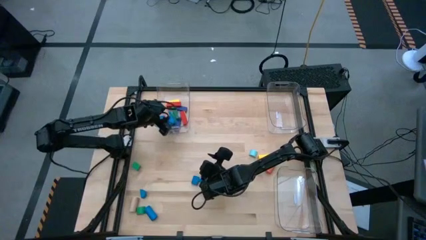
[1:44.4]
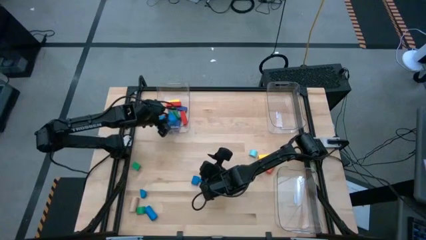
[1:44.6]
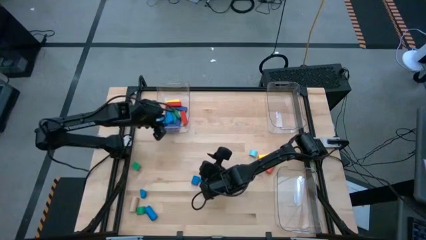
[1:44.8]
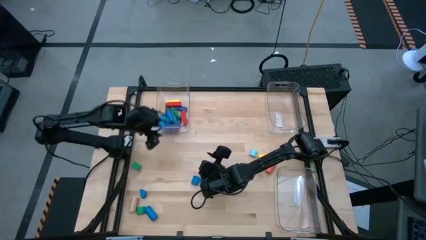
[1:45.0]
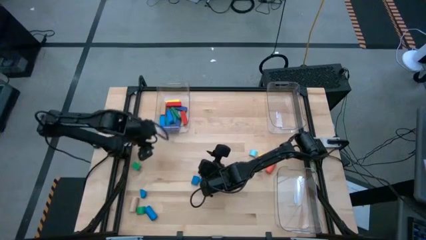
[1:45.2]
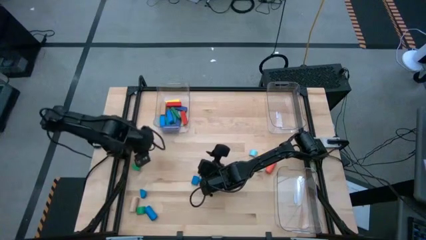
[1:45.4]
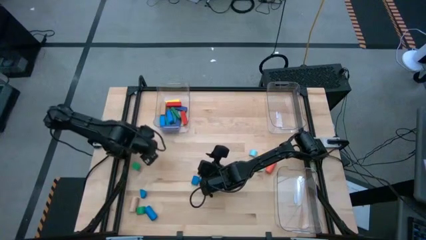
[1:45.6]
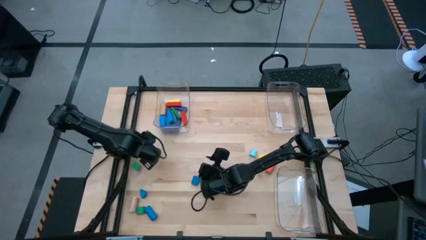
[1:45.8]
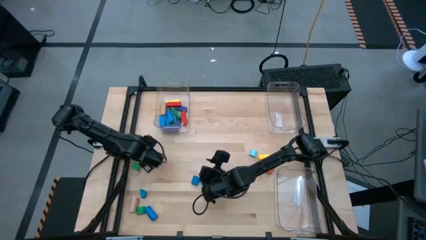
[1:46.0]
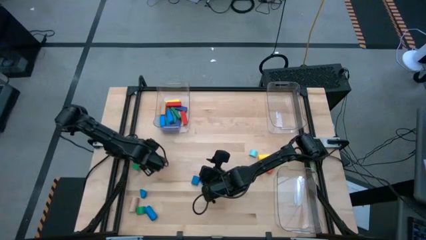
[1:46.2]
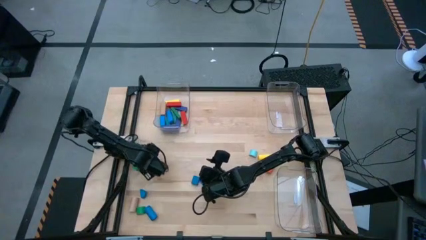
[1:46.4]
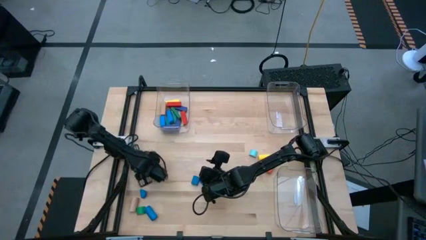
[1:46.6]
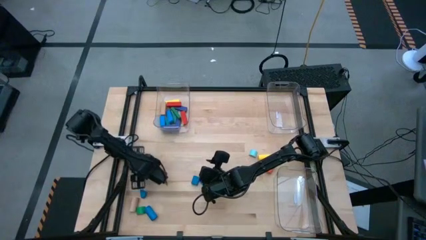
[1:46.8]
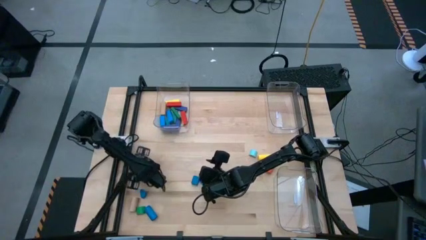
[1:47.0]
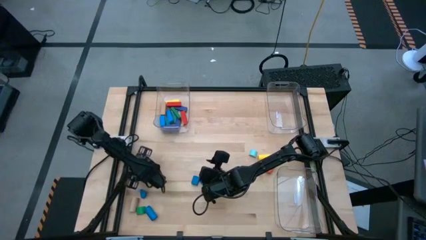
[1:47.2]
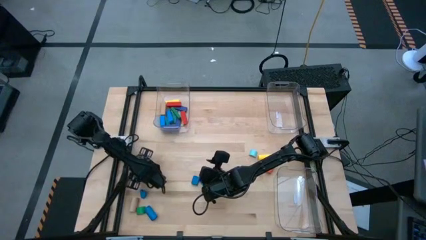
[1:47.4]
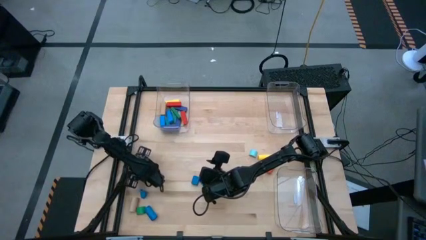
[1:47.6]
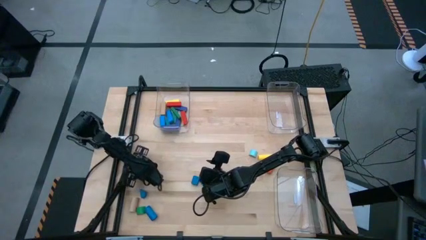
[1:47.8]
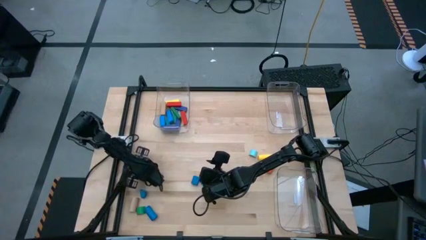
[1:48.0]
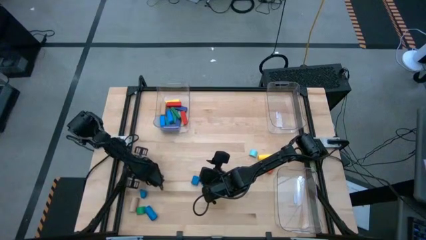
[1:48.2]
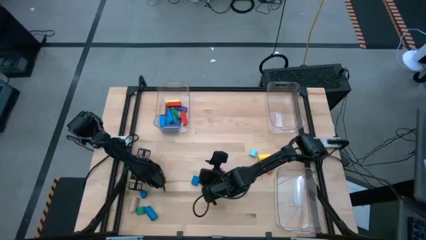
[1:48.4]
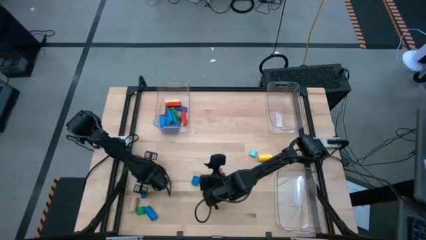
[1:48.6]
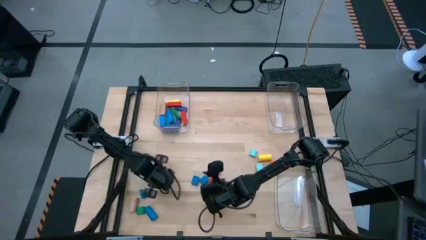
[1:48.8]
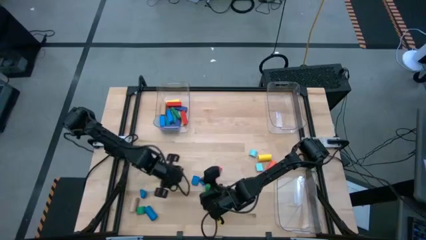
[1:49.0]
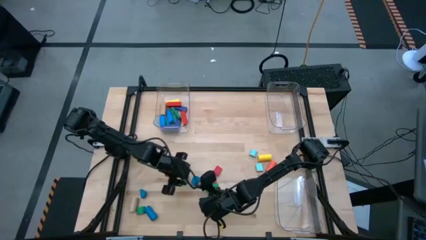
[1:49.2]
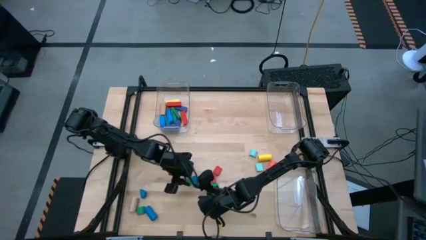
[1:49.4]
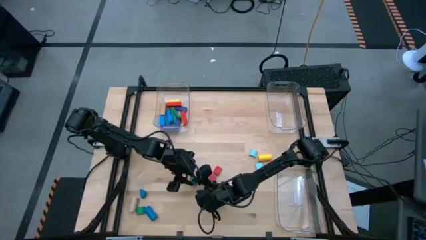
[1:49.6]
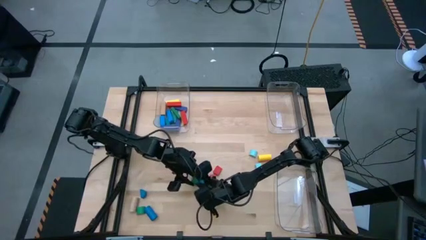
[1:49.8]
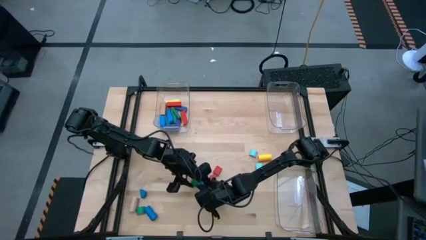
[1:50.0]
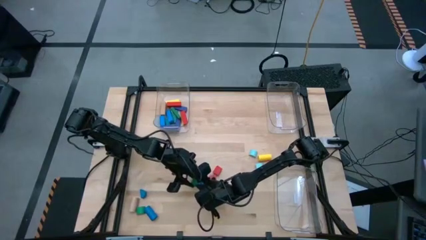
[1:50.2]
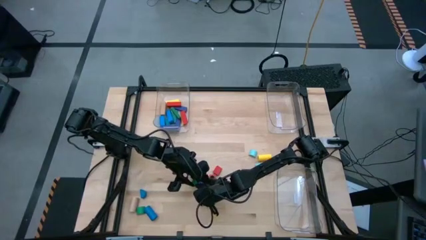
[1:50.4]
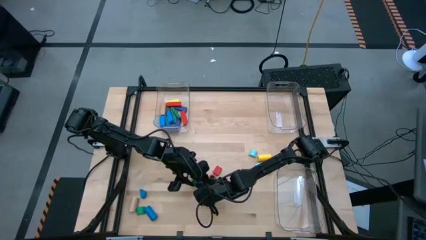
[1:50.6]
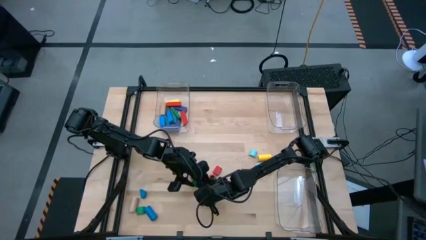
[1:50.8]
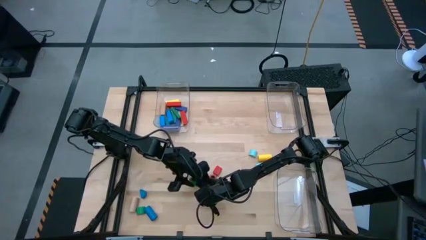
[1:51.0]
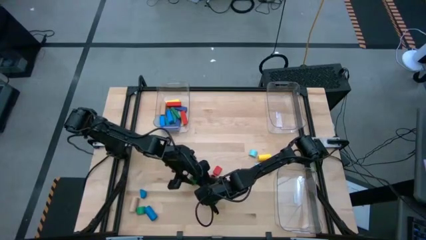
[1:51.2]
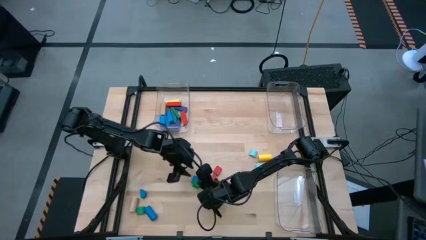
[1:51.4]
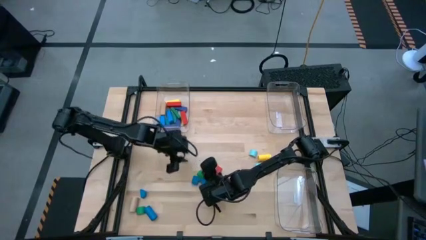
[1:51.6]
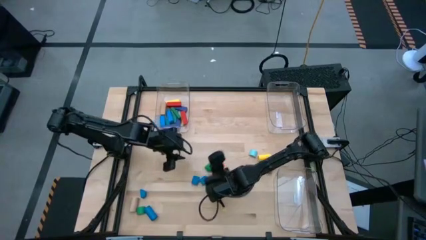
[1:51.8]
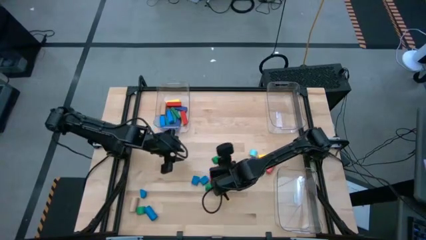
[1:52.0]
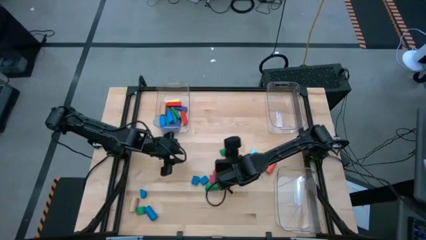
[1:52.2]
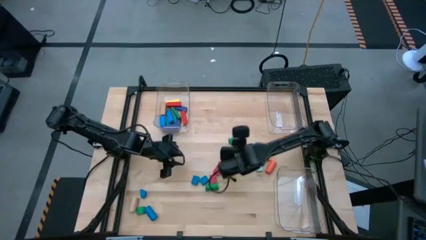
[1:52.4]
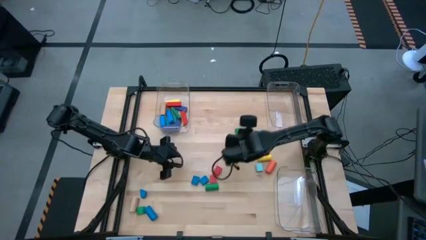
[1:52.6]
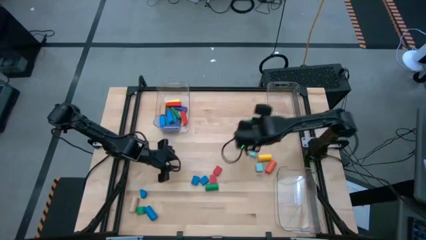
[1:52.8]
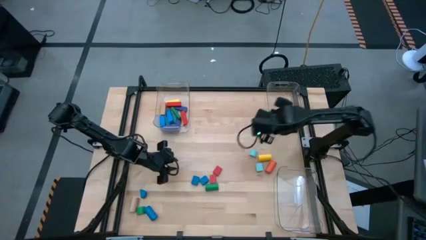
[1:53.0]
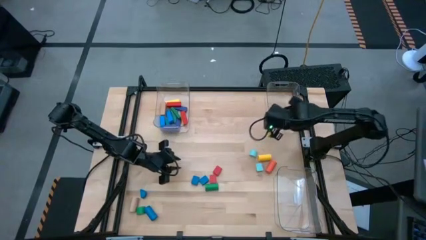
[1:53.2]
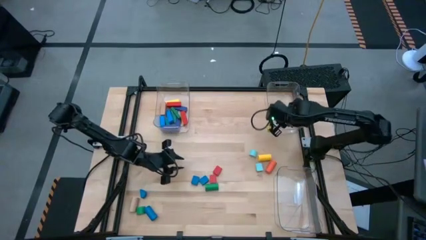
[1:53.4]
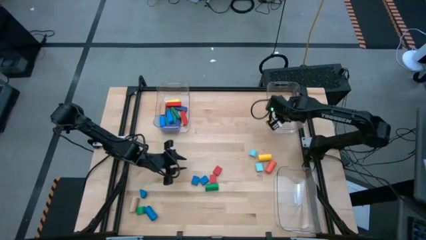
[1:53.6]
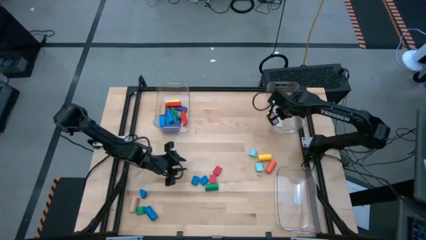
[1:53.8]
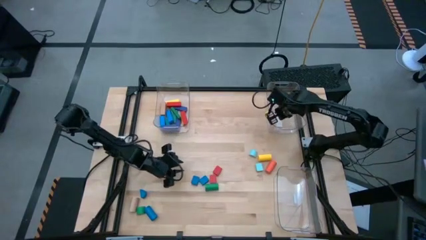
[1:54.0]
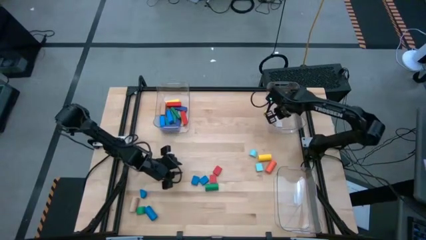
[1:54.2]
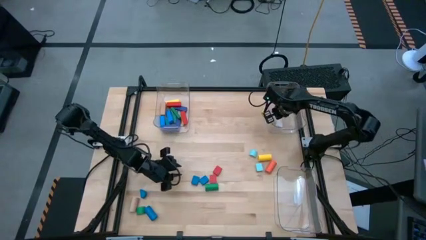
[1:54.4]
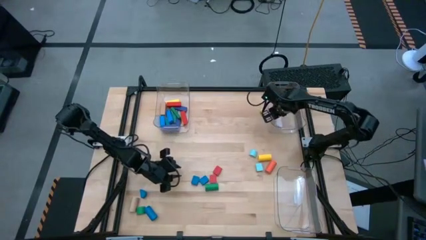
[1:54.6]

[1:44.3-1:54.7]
Task: Sort blocks by size
Put the green half-circle block into the top right transparent bin

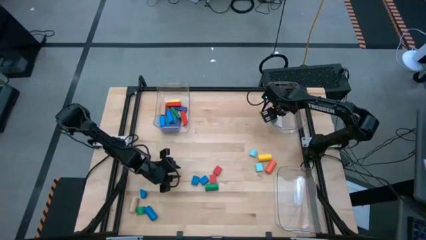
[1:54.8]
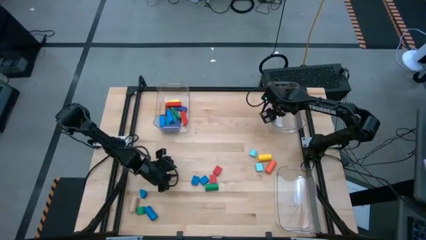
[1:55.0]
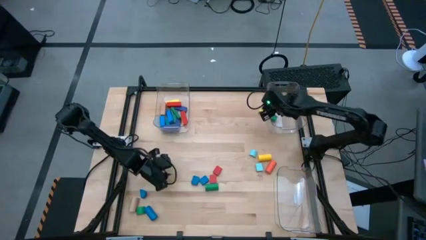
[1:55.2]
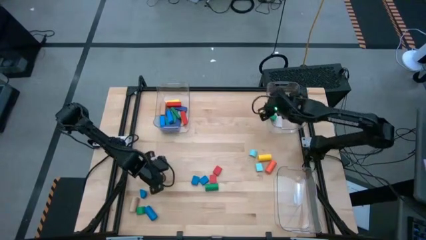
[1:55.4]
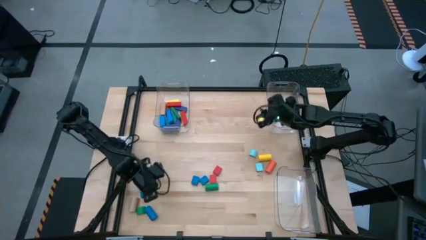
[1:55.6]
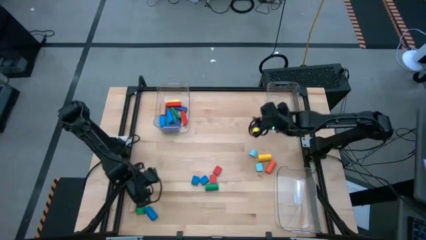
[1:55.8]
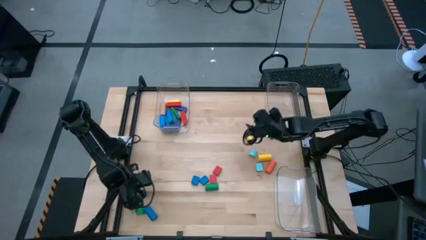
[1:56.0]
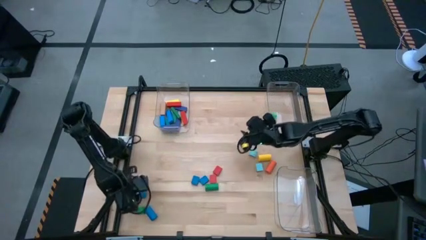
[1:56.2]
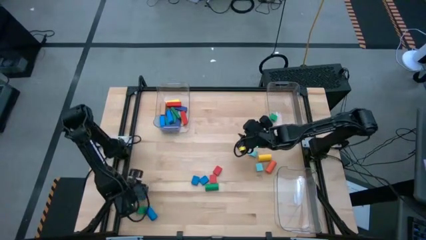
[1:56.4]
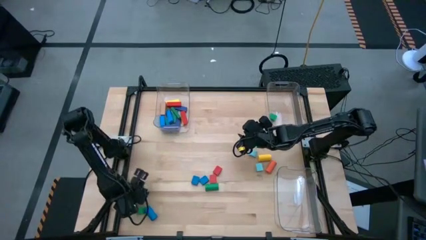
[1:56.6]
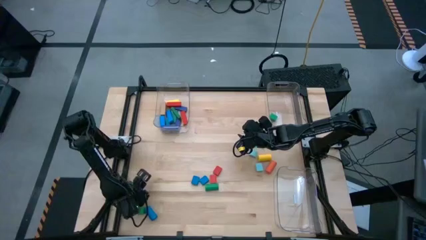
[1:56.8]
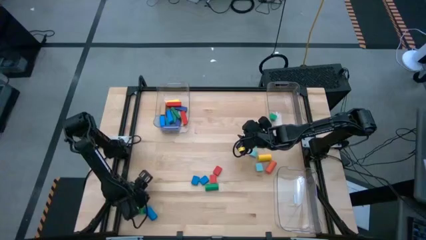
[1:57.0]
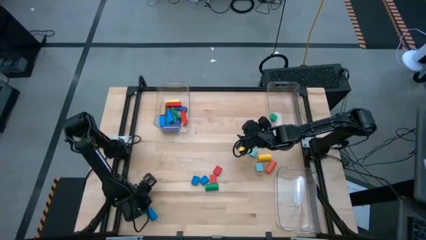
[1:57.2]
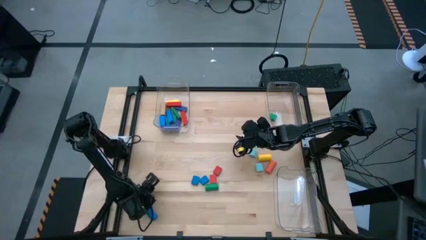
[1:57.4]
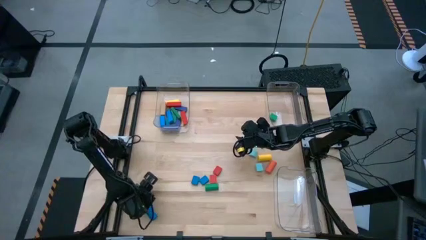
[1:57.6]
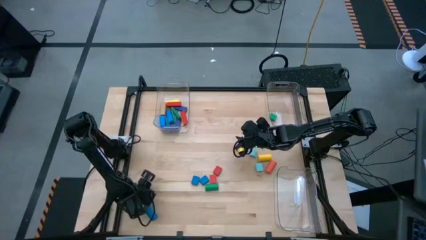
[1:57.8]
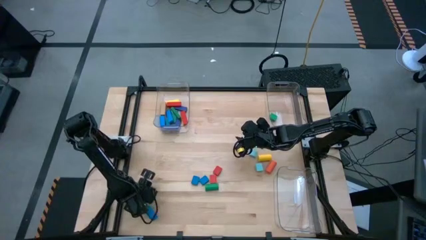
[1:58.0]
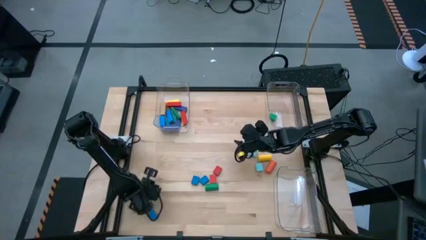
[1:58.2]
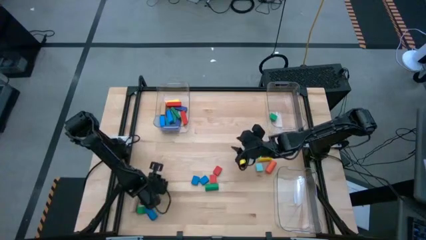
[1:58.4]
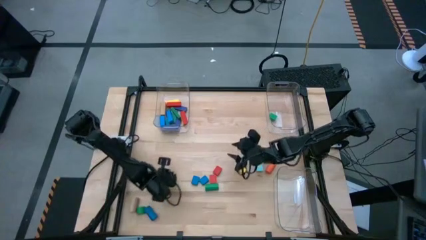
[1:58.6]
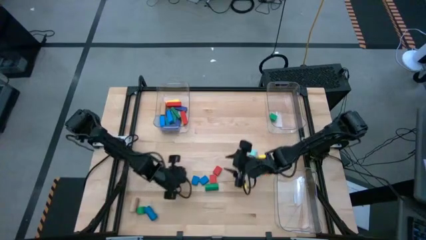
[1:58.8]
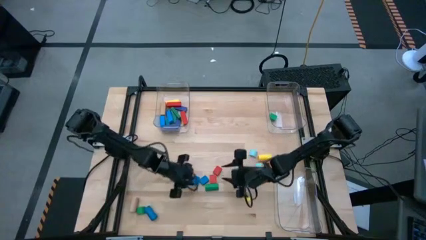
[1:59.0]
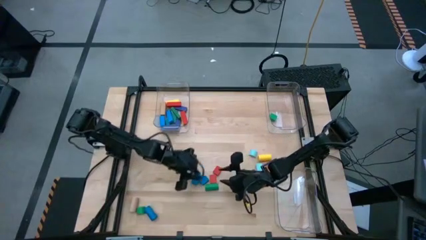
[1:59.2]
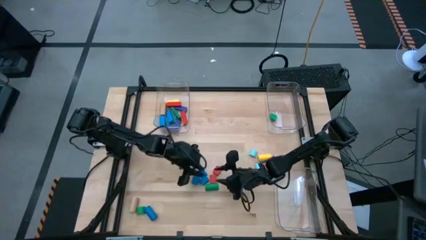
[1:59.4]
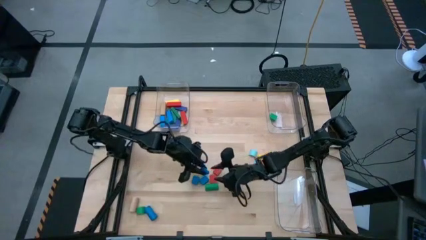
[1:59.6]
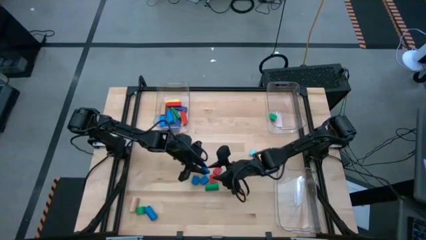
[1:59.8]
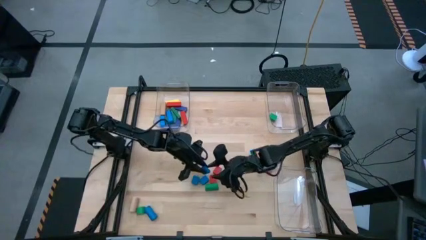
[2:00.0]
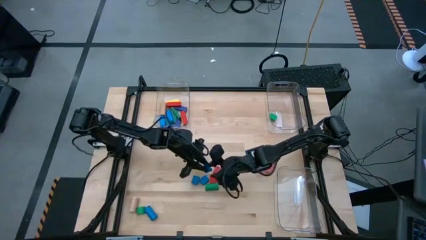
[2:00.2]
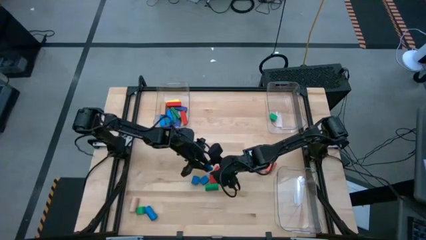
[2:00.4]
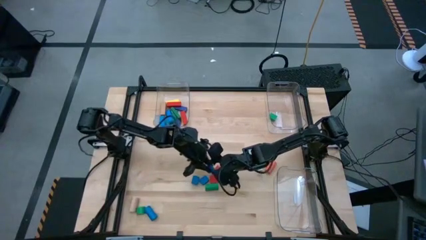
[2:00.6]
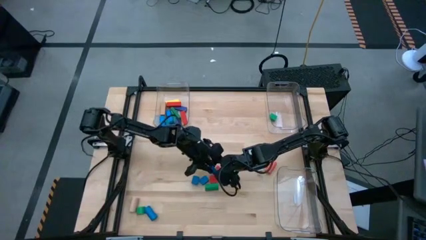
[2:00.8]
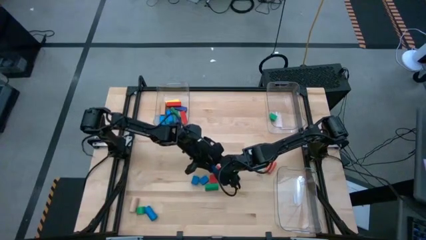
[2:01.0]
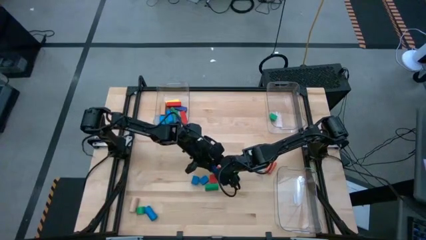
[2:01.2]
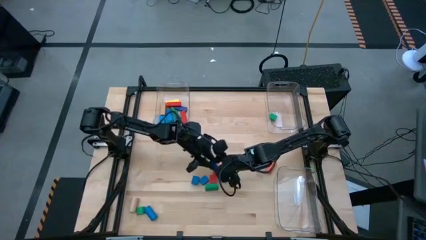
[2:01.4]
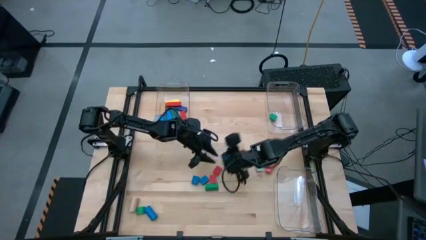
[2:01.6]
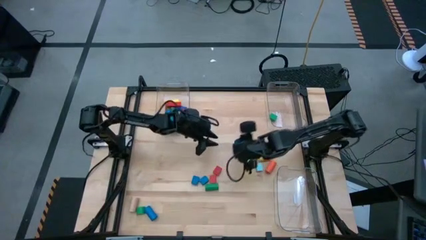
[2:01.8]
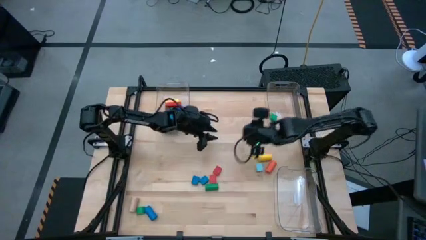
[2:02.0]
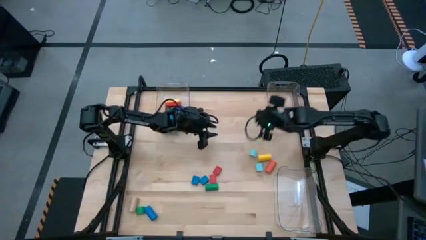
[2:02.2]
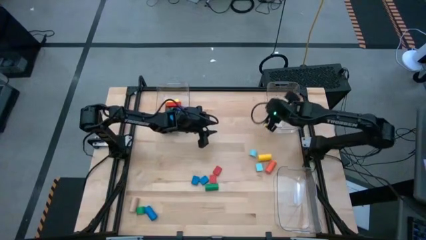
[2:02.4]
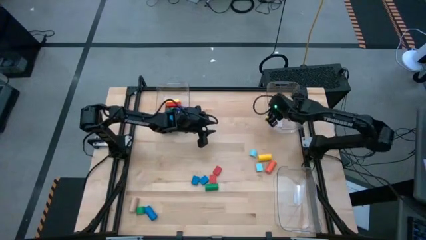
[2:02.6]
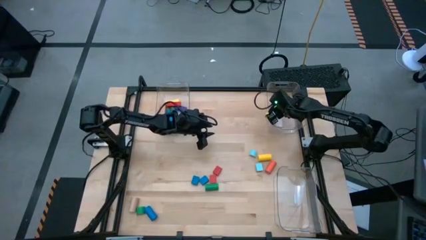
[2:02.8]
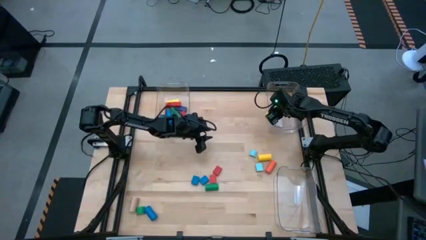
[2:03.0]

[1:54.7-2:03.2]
Put the blue half-circle block into the top right transparent bin
